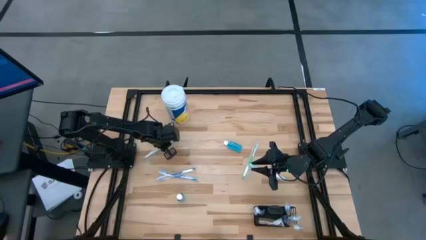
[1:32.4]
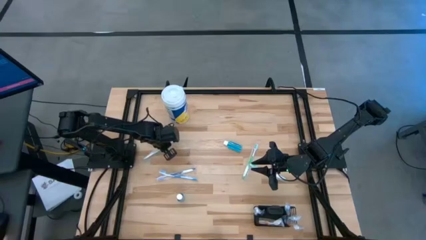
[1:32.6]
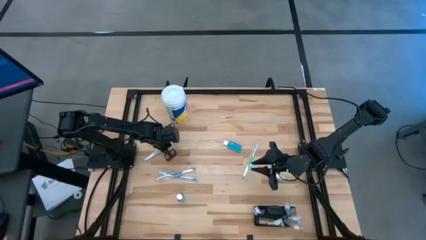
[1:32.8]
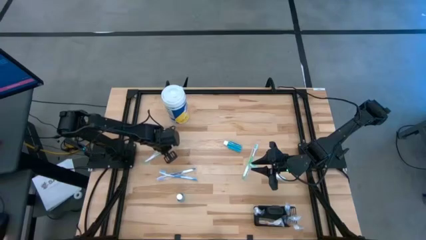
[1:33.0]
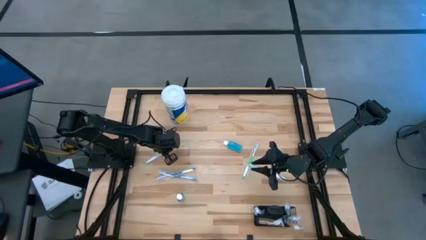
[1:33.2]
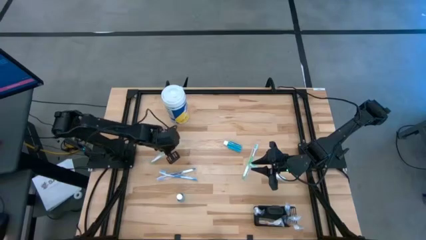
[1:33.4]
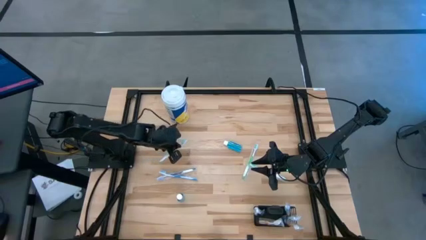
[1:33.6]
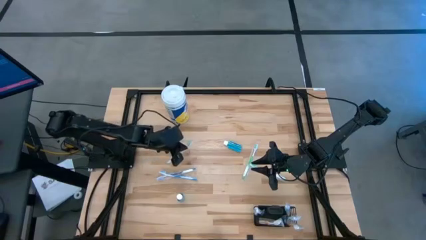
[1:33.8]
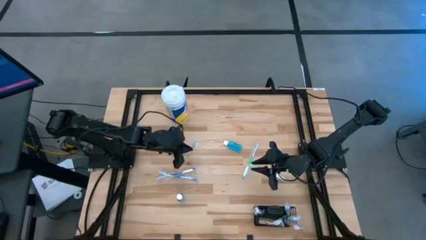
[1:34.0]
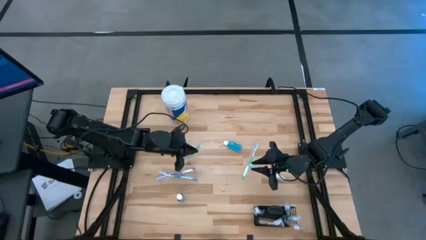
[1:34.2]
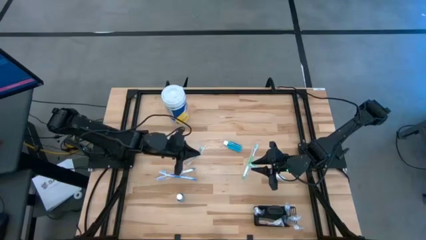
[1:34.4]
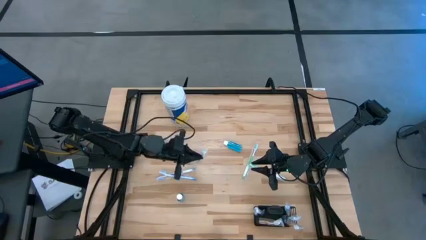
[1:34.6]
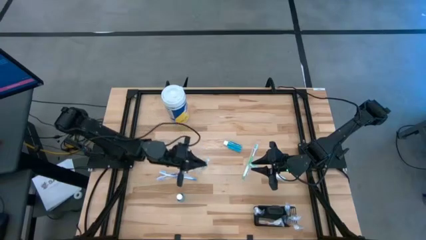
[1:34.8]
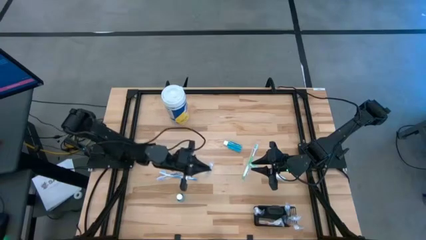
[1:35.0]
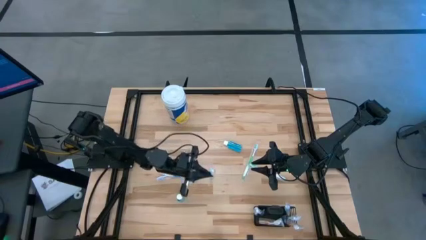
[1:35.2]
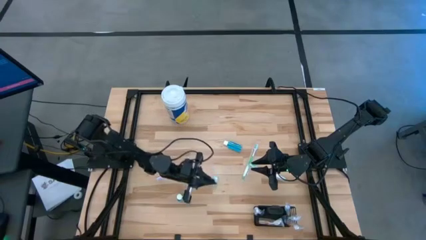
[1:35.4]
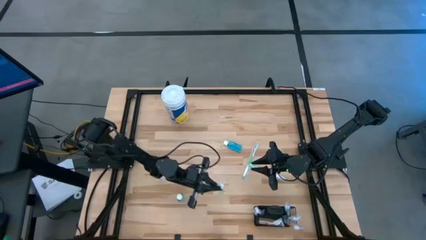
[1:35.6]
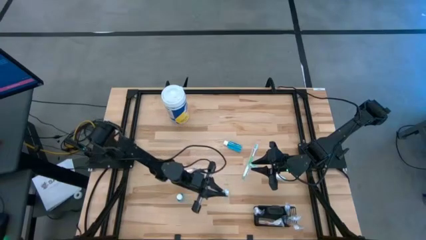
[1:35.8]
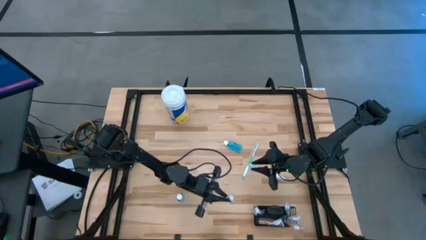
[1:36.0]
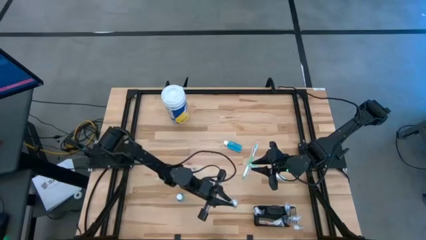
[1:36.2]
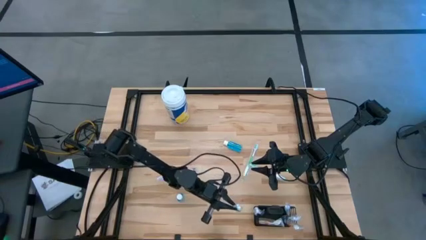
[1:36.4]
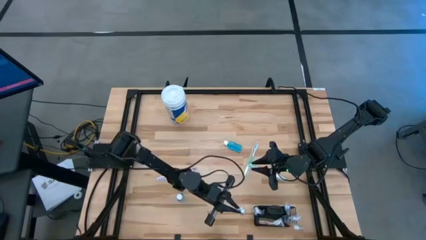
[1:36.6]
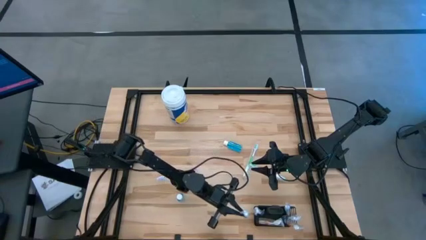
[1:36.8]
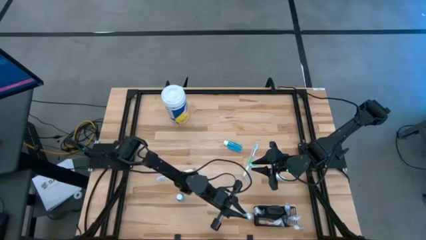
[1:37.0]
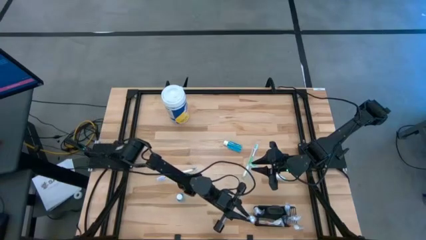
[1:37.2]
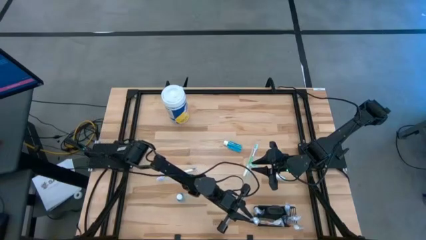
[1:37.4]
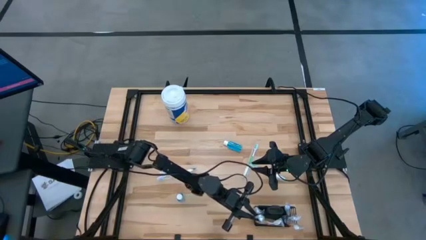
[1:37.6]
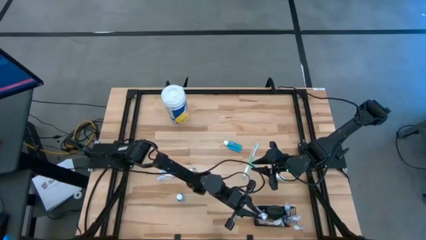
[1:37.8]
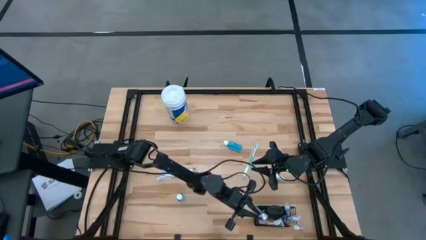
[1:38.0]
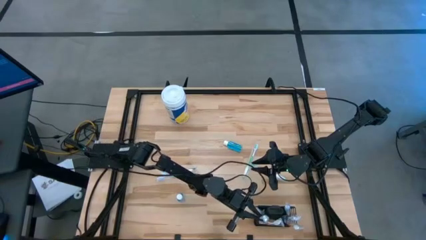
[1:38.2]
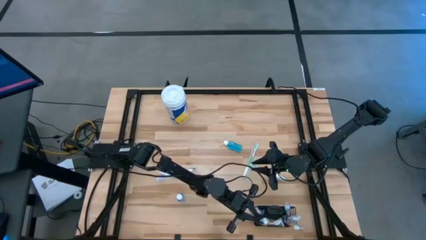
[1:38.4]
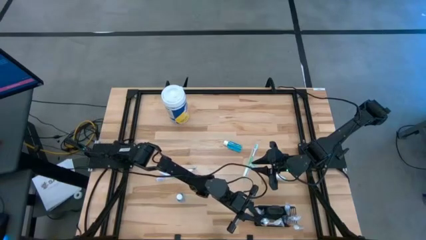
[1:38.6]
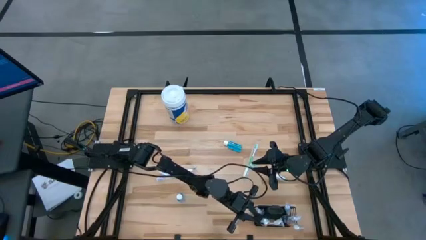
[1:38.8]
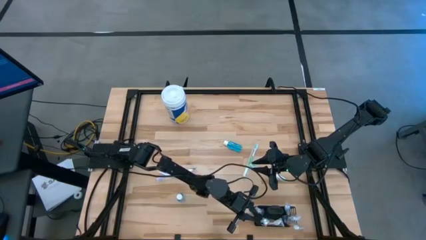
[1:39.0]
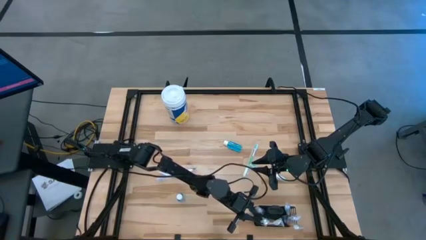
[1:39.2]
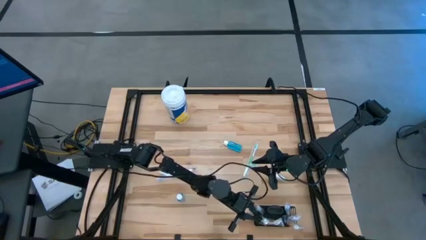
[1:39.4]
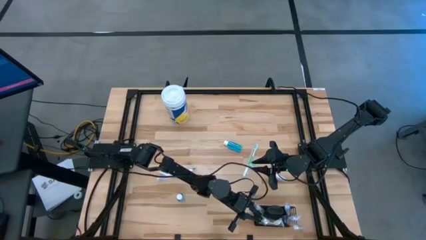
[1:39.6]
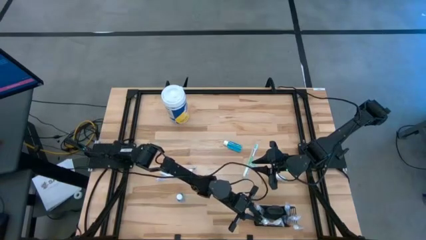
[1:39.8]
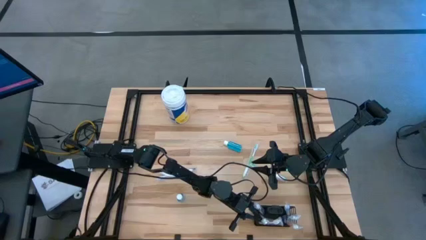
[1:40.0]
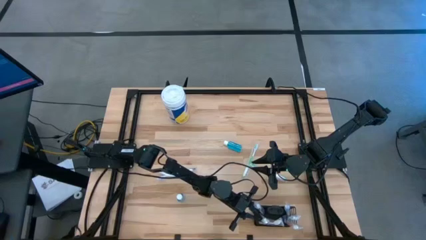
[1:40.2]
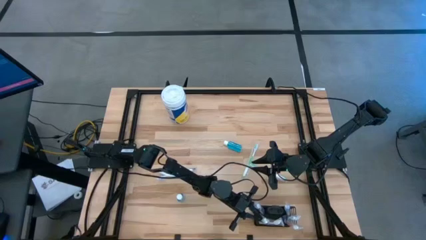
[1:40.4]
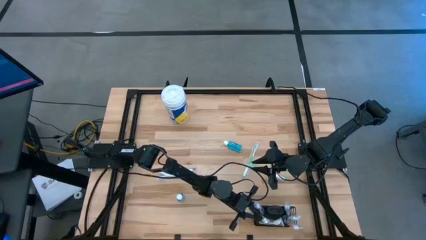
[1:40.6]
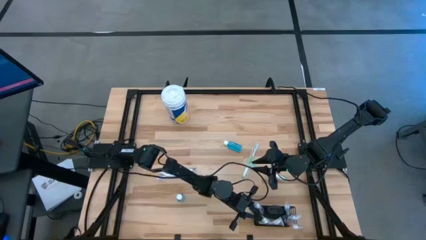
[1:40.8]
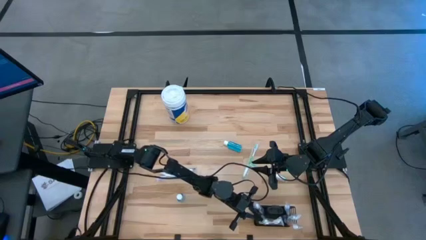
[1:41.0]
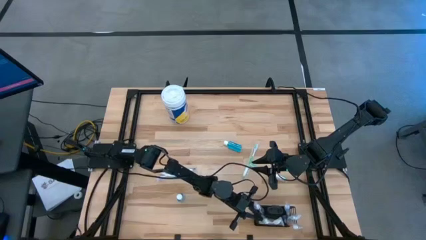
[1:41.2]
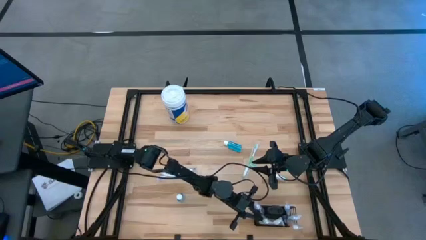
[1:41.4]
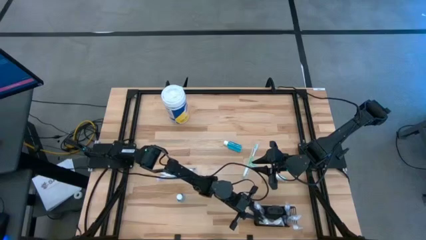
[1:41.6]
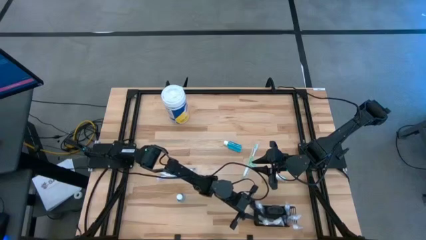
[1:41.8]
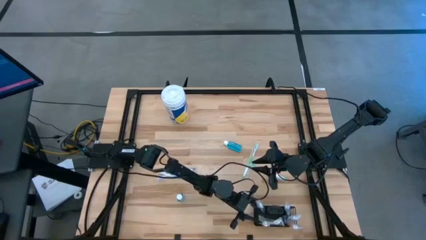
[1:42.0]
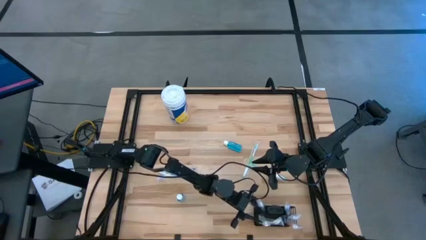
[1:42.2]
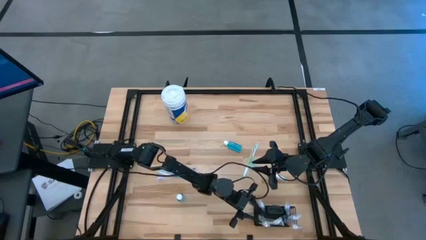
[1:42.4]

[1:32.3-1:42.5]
Task: Pick & Place toothbrushing station
Put the left green toothbrush into the wire organizer

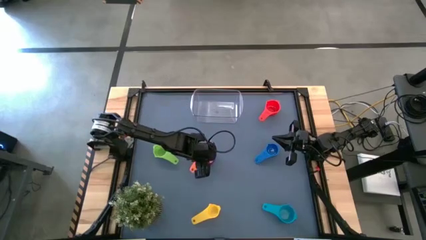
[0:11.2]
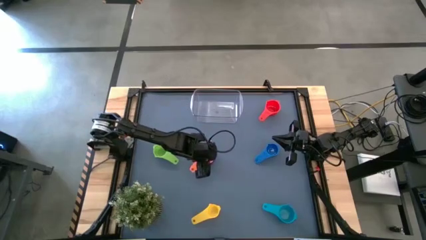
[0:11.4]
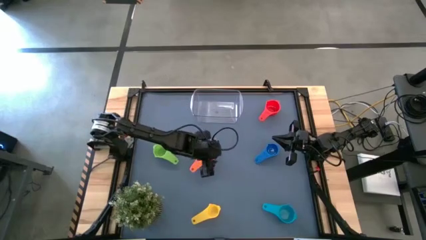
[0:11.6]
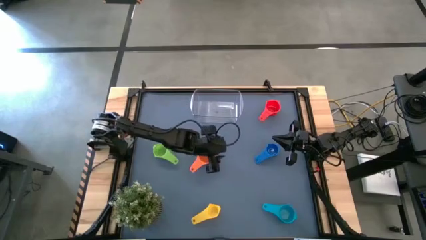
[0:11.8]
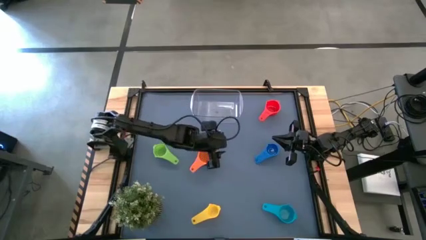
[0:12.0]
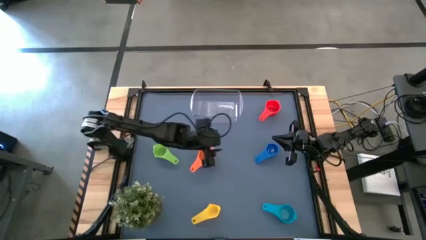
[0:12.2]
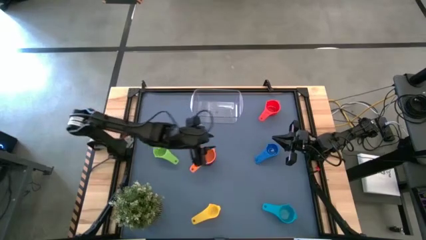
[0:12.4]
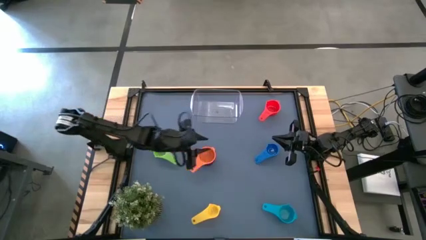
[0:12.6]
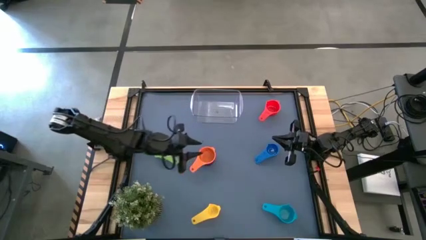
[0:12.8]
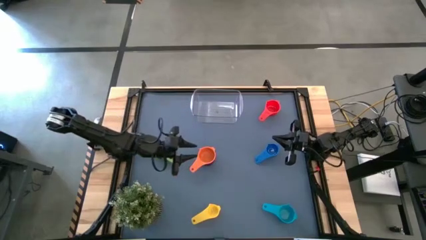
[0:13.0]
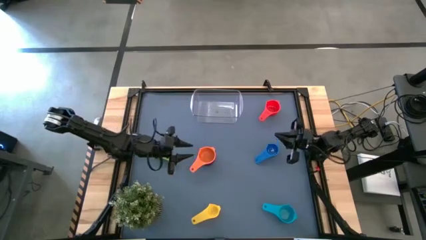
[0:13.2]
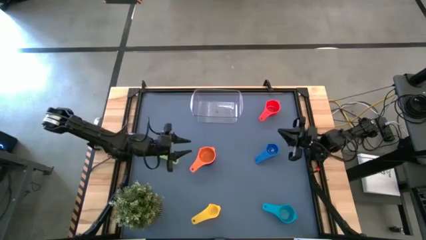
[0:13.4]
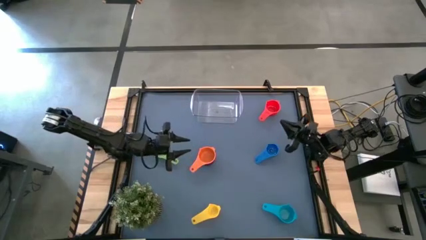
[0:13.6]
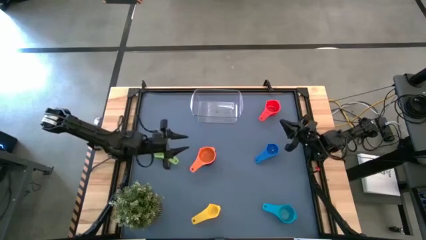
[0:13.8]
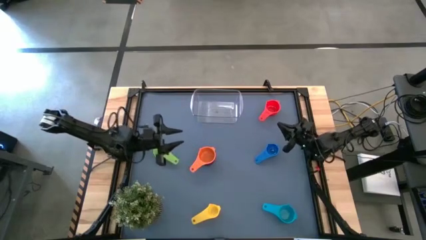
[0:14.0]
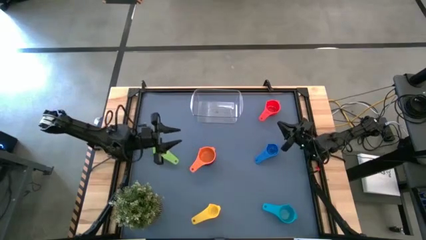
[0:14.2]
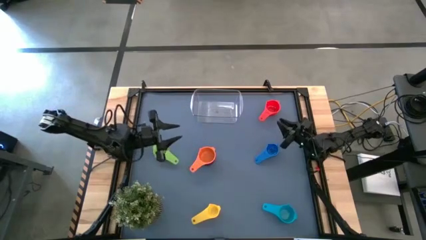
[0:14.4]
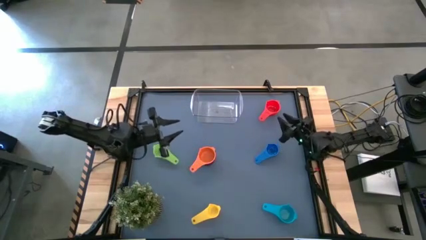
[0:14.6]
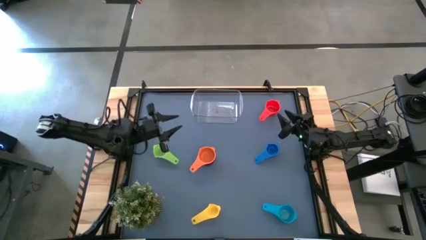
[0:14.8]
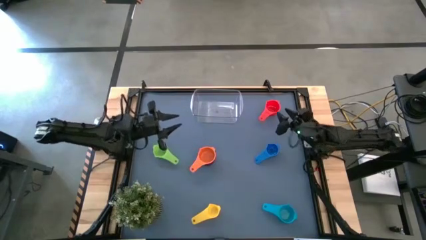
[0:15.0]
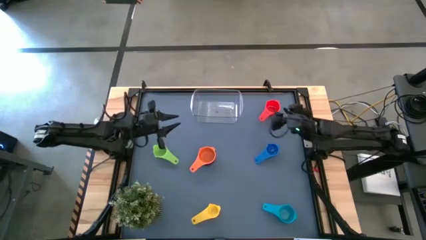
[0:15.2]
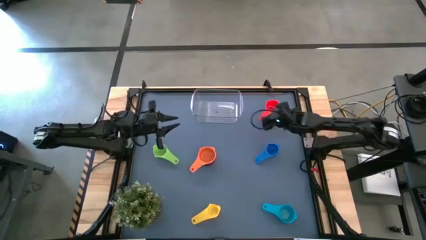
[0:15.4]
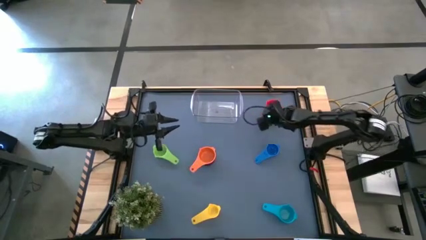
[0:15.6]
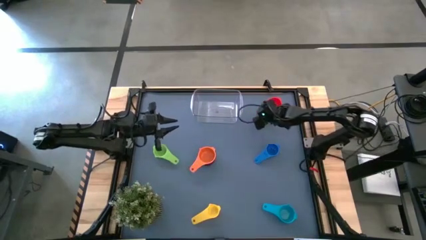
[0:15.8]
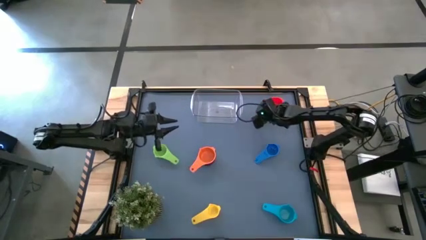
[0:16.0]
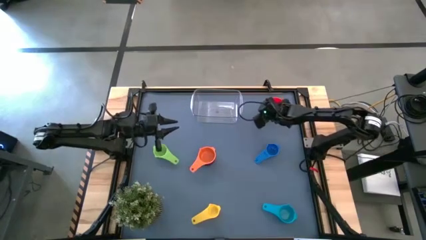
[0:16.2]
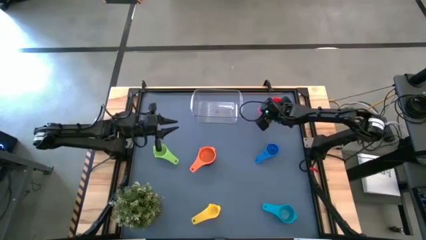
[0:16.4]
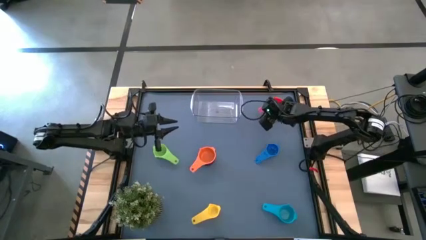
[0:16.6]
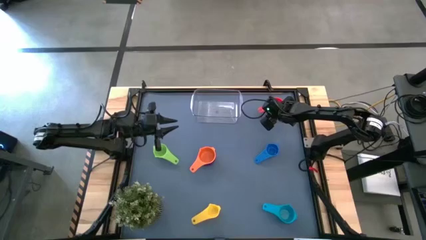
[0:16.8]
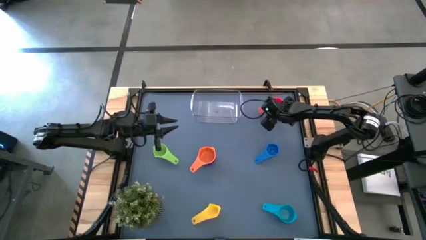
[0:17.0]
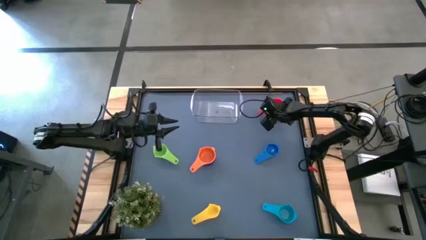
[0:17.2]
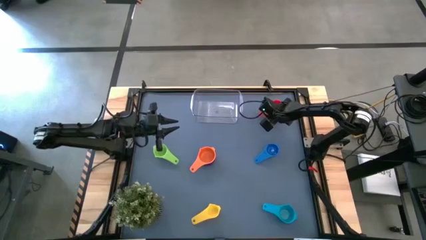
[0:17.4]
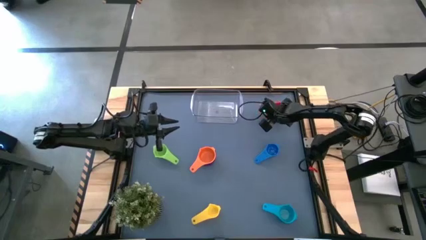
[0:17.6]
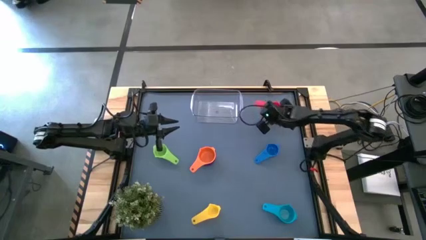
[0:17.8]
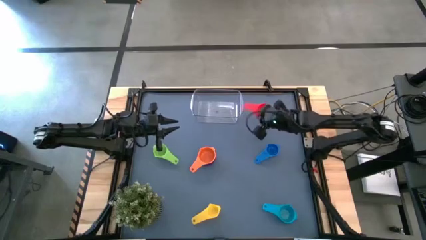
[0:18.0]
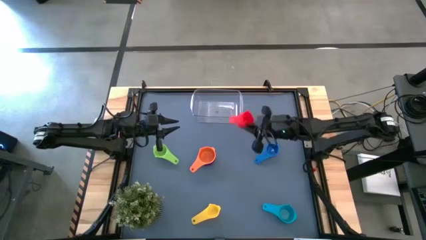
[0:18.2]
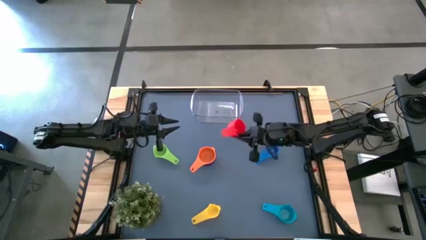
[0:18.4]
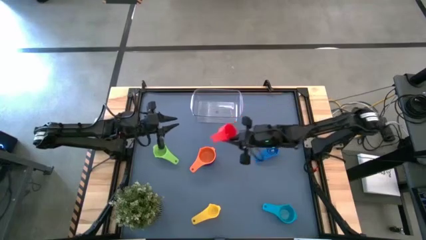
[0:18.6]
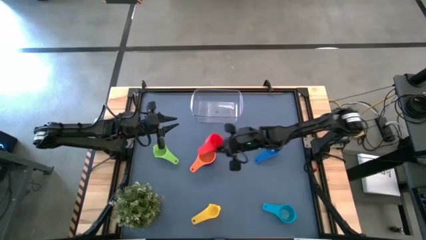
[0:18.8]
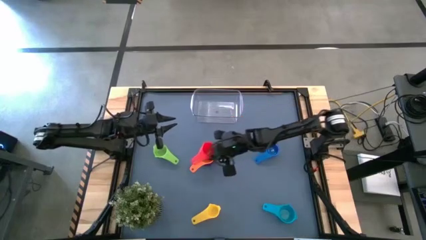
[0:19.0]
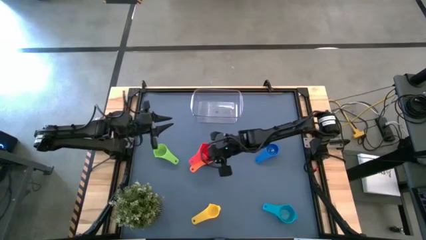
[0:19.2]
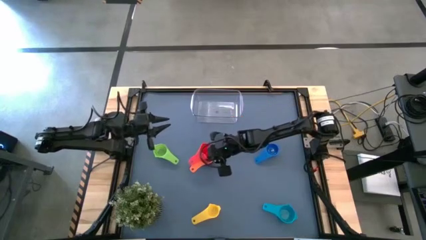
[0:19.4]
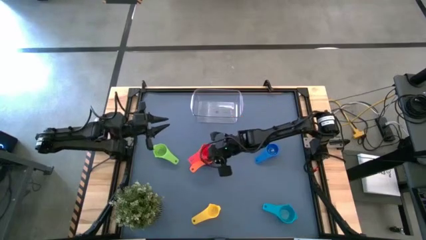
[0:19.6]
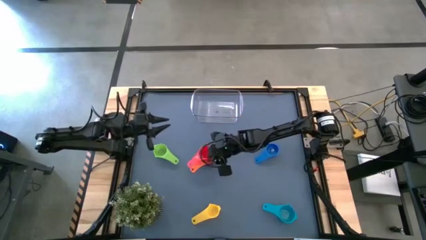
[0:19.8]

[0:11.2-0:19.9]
Task: Nest measuring cups in basket
Stack the red measuring cup on top of the orange measuring cup
